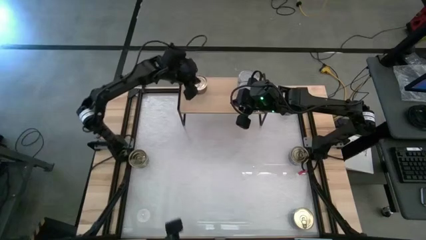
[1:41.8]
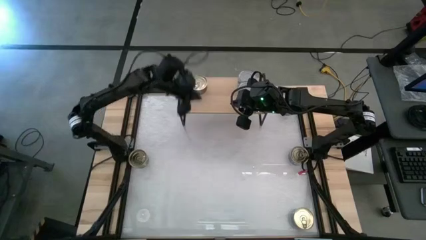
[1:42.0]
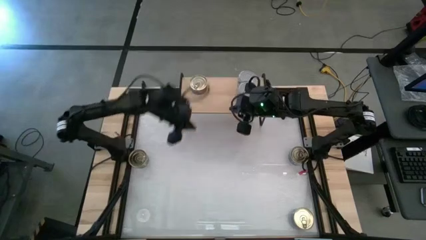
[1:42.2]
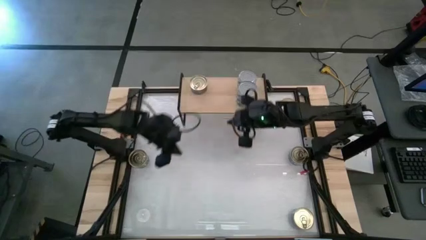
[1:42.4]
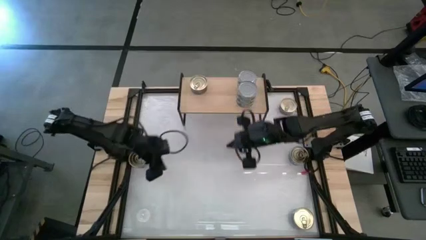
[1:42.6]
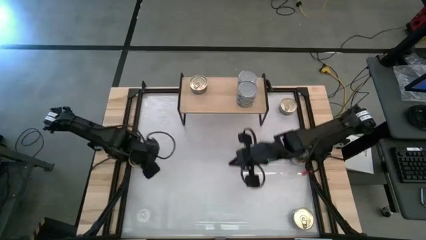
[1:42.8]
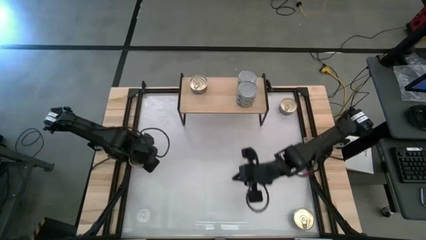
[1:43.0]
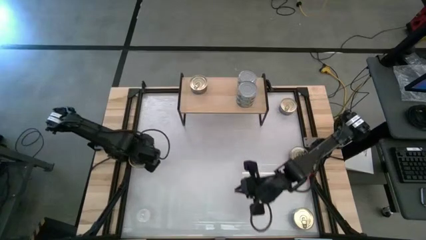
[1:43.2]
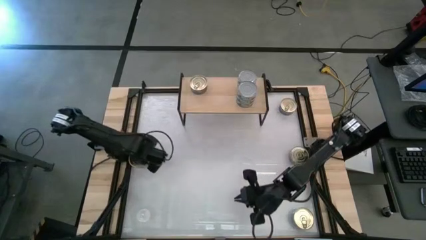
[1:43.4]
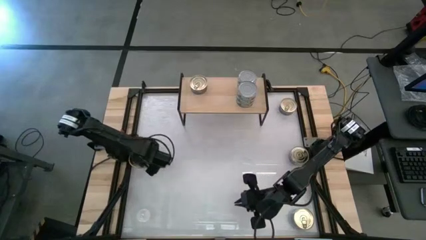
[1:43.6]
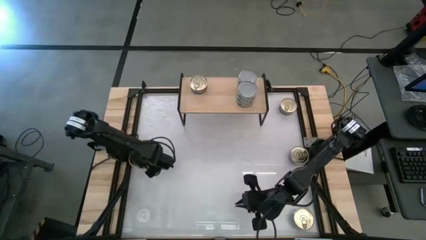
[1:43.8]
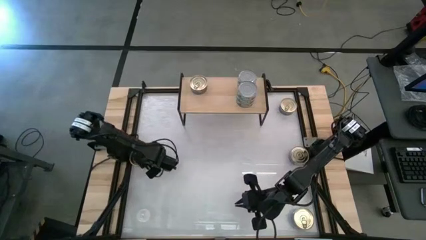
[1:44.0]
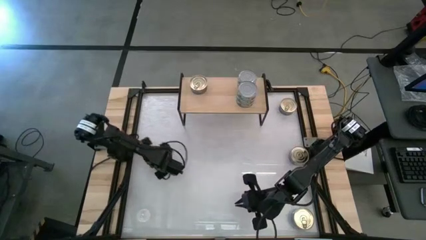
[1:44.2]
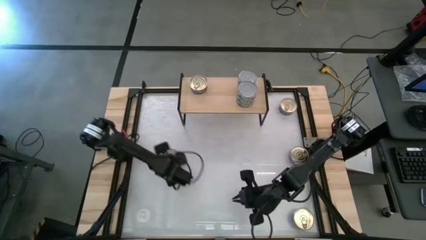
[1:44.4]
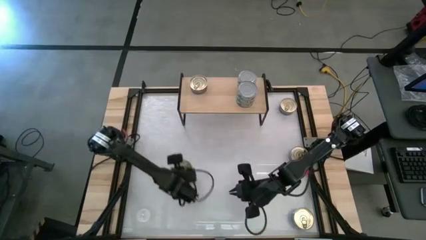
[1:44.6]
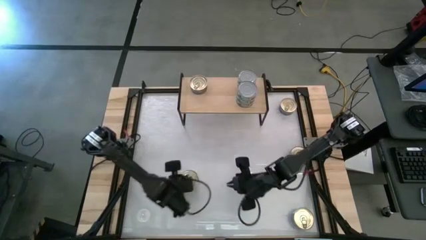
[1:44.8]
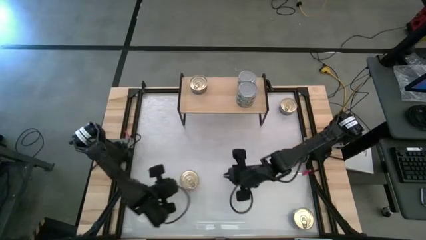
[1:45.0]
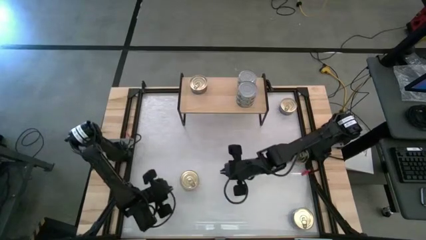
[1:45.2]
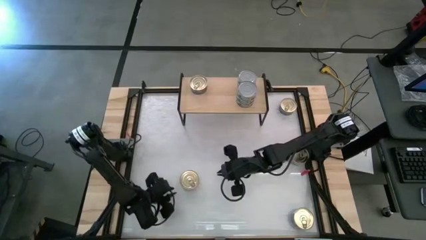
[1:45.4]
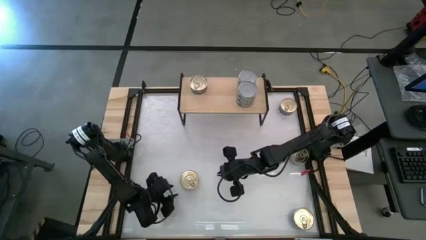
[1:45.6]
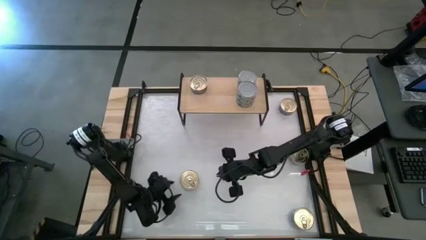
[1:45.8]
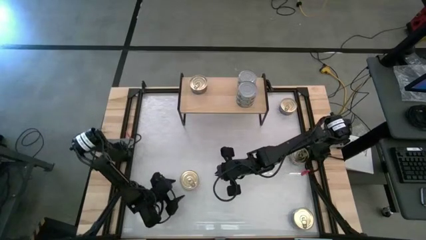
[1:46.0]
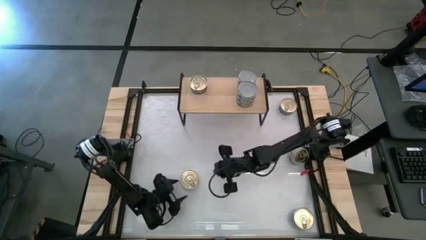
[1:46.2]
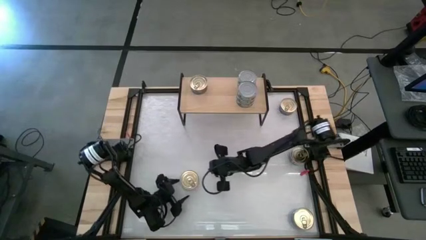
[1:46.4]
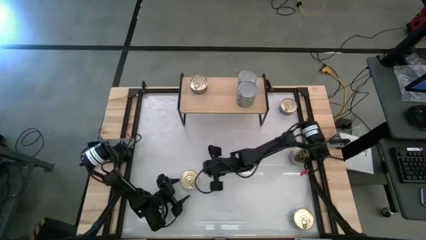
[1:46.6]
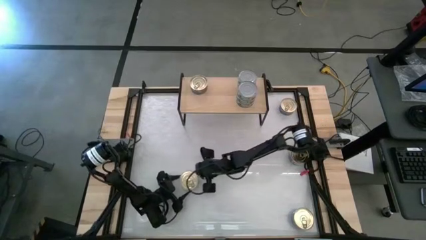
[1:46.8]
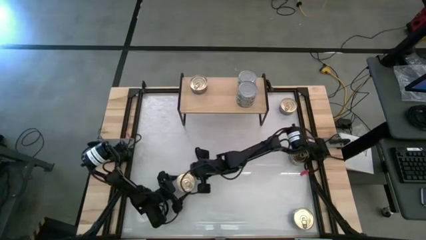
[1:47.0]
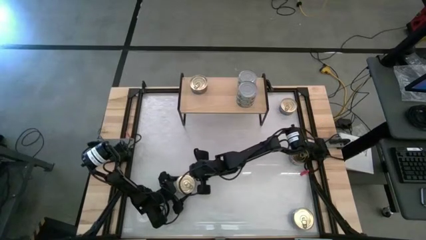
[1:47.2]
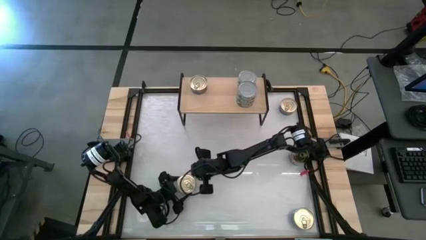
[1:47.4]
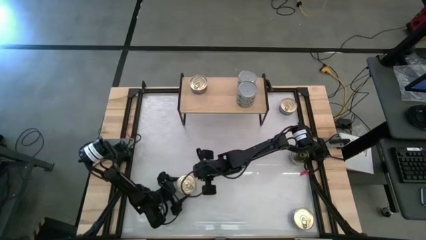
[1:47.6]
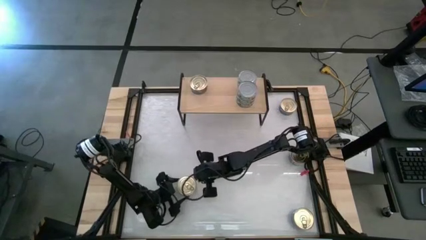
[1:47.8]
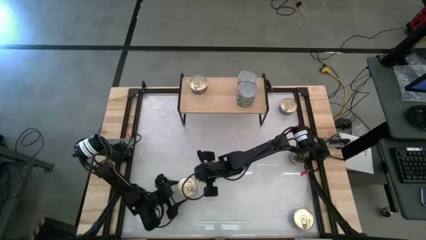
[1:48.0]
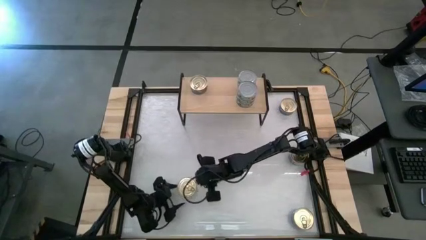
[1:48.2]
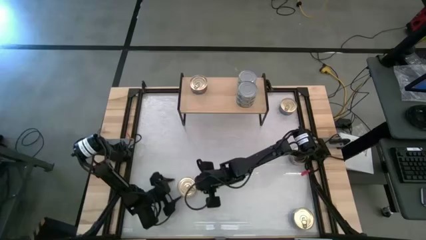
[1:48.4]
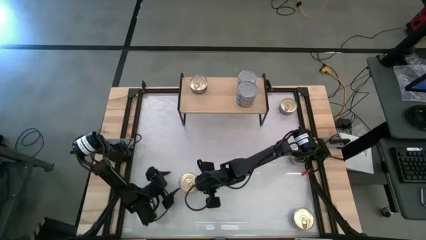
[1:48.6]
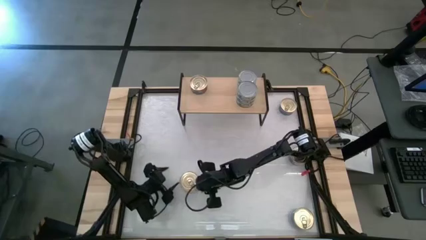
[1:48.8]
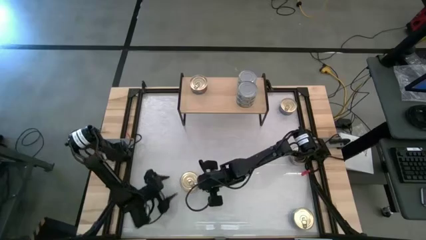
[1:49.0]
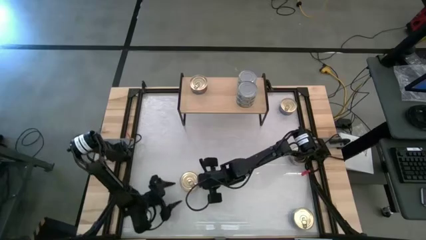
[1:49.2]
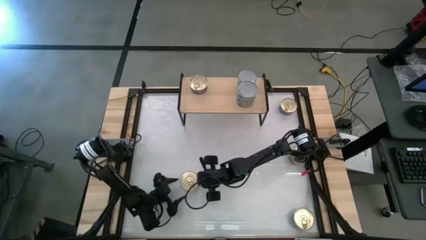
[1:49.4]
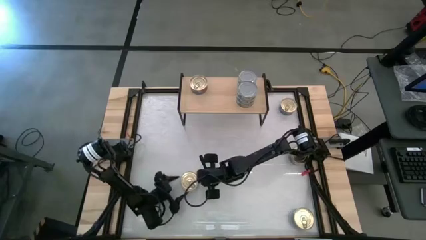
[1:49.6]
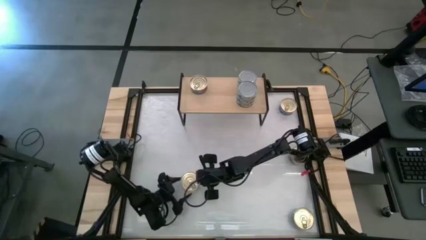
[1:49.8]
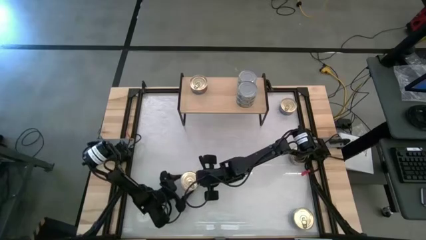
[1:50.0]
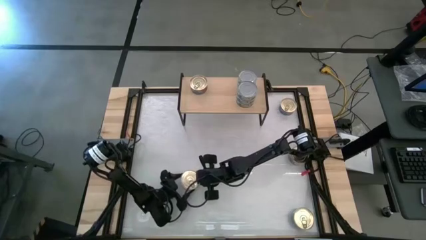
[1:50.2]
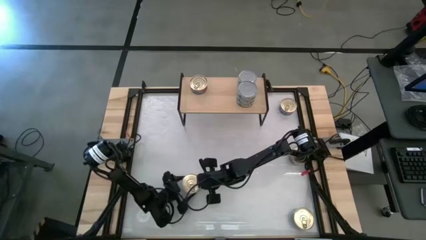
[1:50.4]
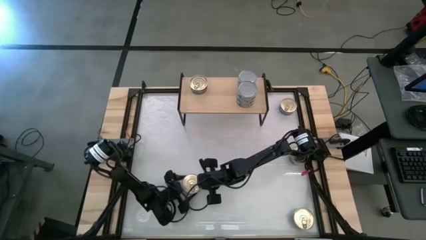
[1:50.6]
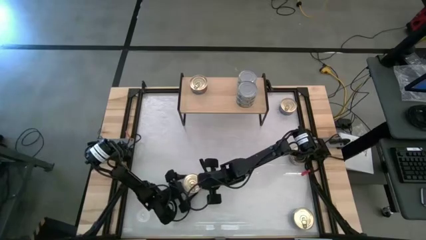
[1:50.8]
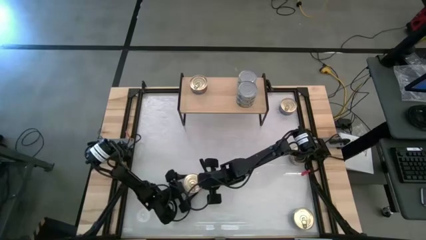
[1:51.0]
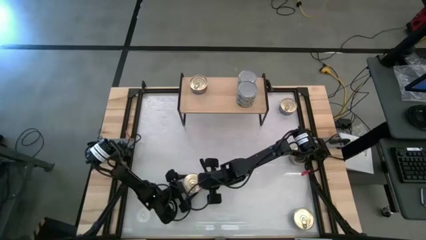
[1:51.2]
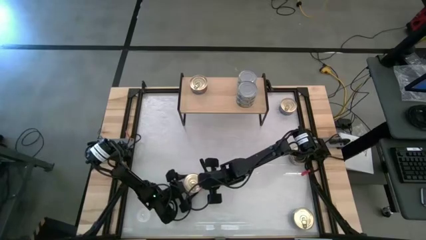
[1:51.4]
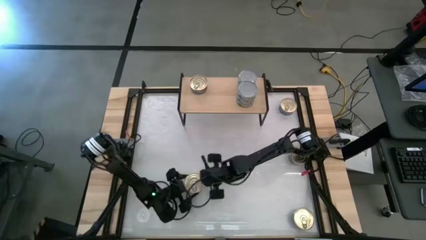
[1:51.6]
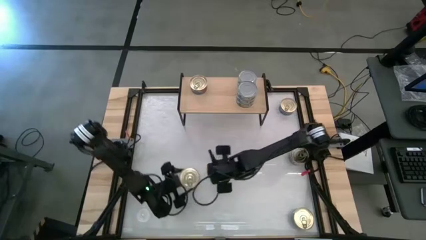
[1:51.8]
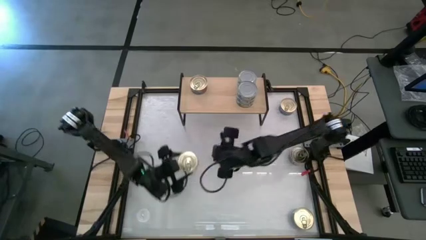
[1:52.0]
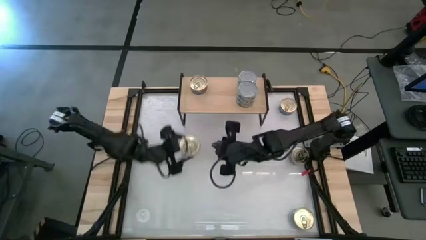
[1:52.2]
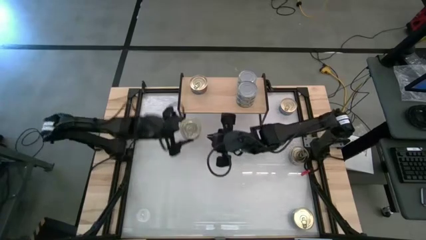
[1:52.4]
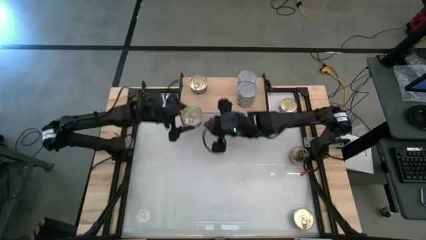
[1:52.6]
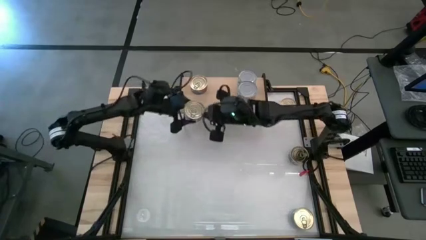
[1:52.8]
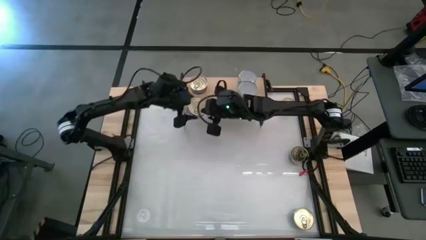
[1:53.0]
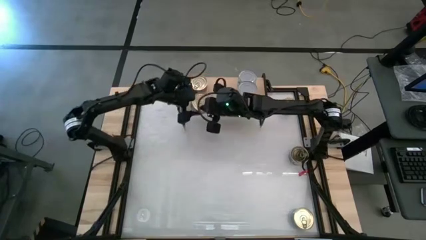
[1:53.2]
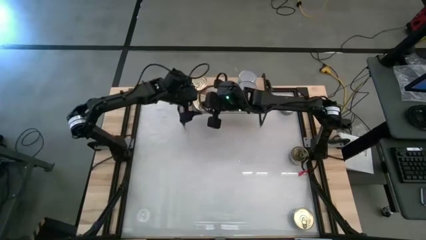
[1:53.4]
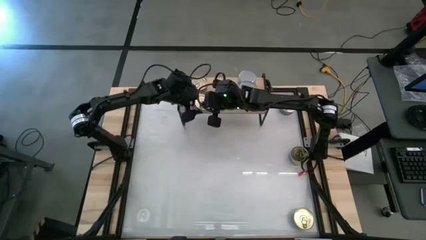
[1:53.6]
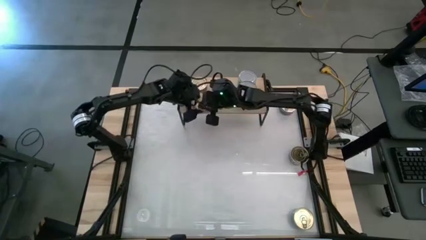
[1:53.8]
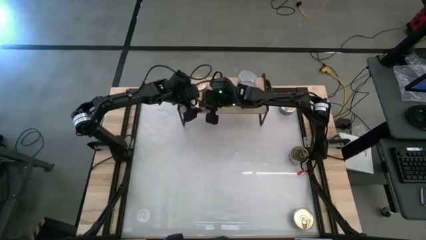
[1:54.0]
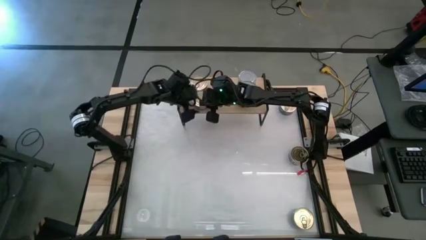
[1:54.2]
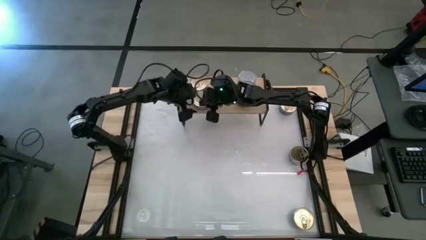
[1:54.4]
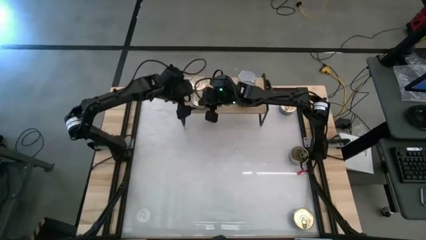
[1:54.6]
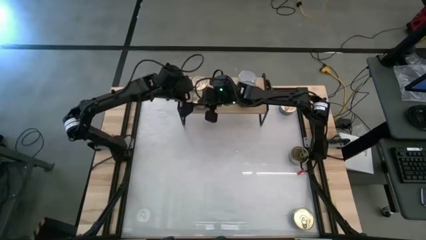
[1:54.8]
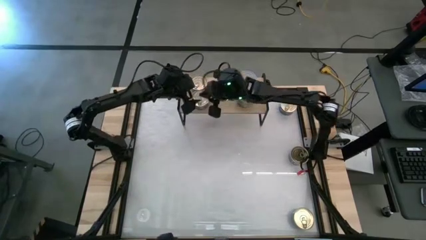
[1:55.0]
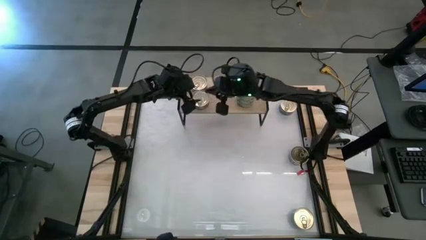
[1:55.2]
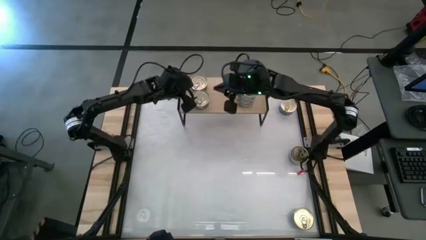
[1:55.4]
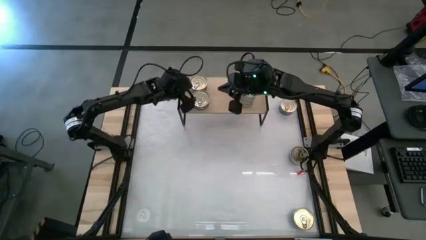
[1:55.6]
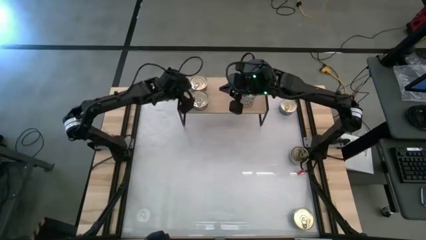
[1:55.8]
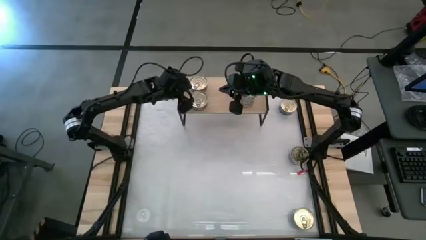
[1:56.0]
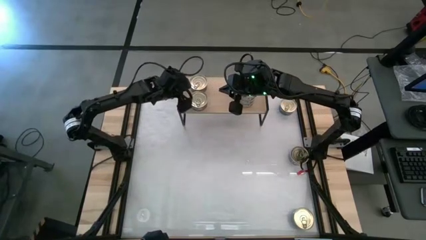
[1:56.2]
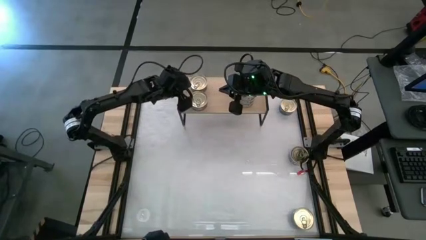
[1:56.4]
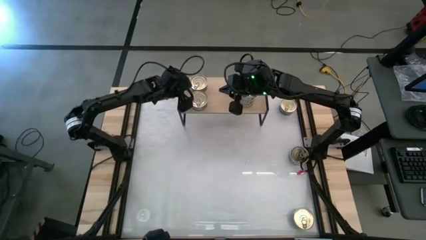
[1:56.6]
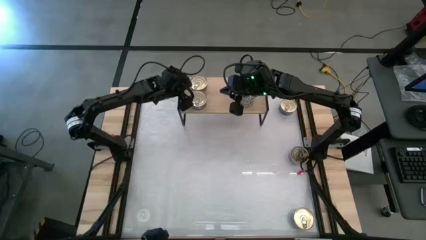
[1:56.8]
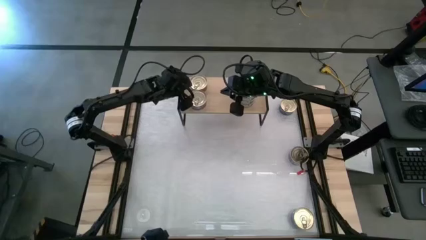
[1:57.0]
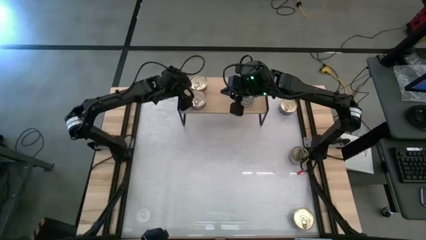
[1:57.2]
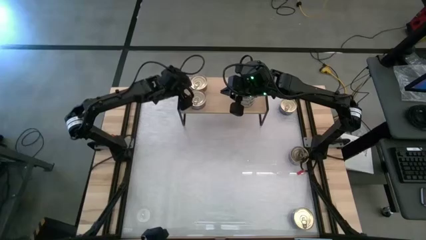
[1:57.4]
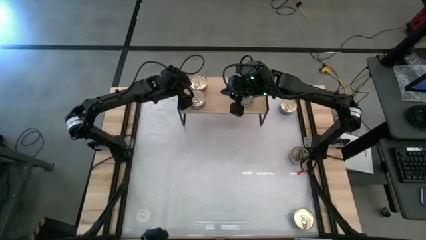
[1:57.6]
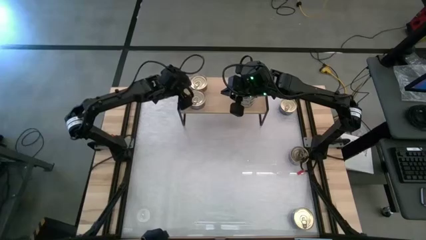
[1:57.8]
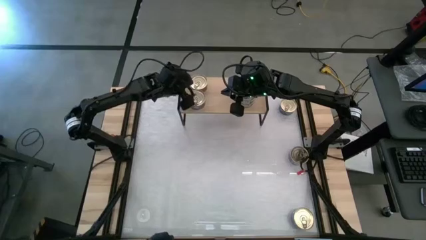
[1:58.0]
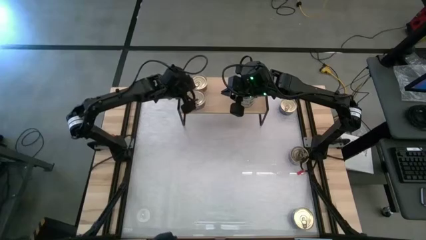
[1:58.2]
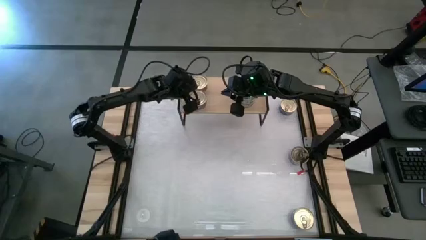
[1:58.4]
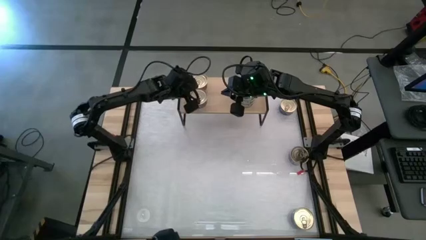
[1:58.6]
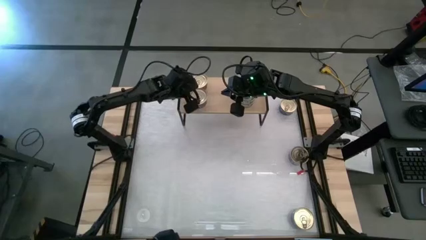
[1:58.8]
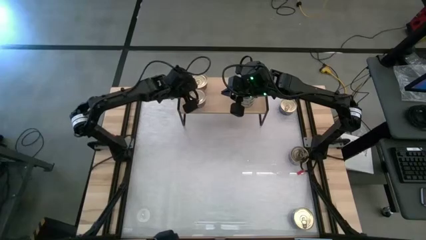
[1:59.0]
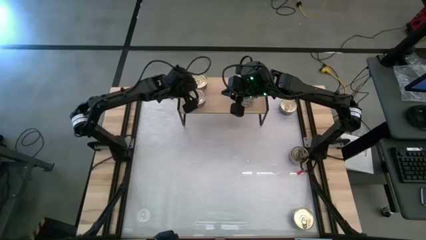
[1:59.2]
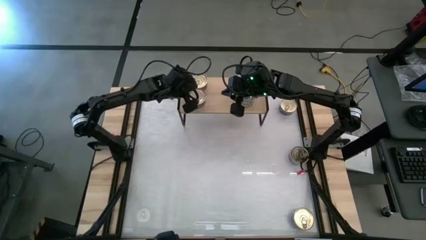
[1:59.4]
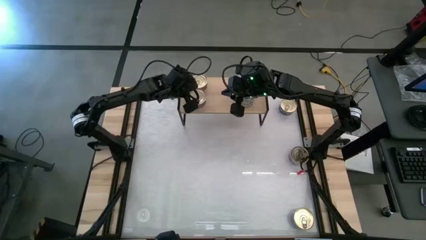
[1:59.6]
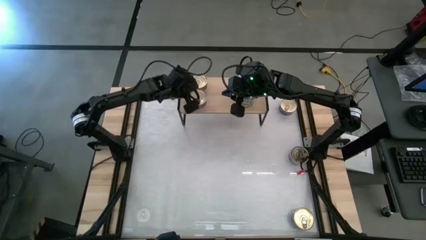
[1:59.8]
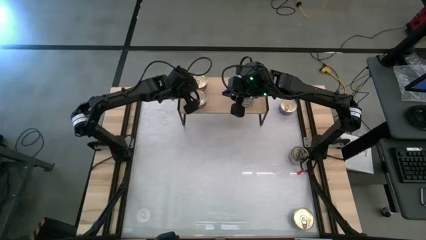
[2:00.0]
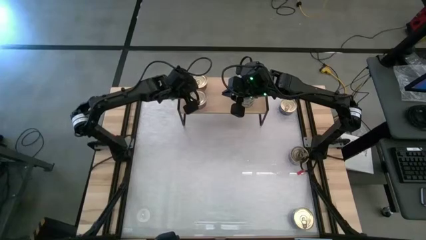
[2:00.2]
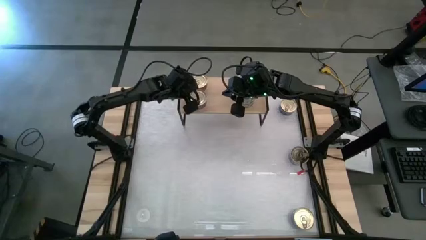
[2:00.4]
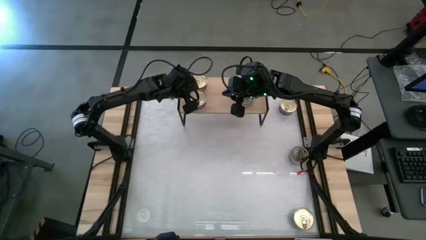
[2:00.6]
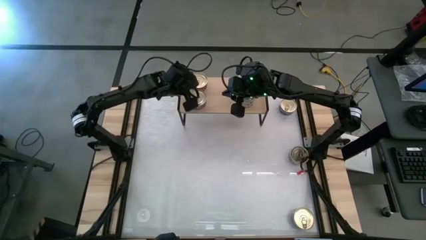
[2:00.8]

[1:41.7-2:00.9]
Task: Stack canned seafood by type on shelf
Put the left blue-pink tuna can on the shelf aligned with the other blue-pink tuna can on the shelf
